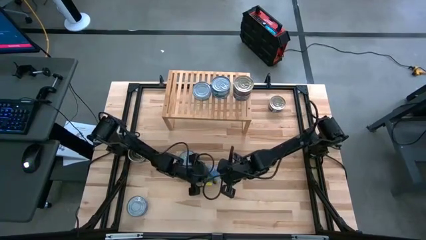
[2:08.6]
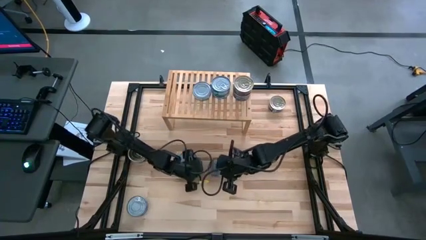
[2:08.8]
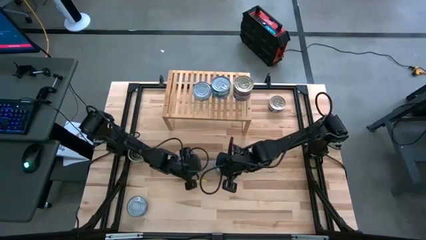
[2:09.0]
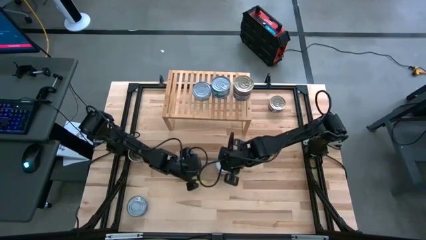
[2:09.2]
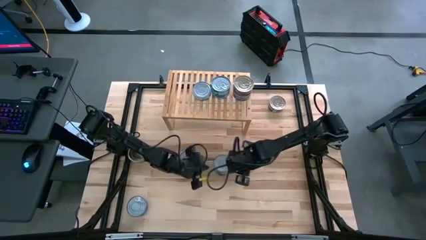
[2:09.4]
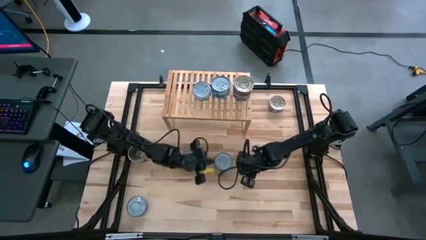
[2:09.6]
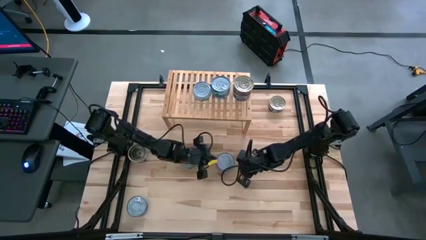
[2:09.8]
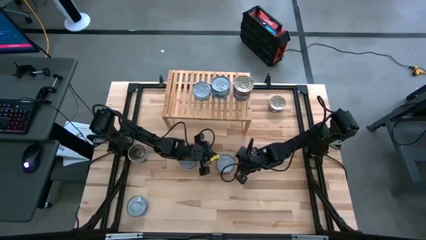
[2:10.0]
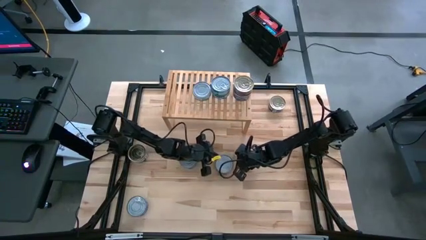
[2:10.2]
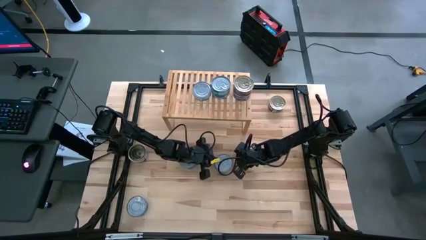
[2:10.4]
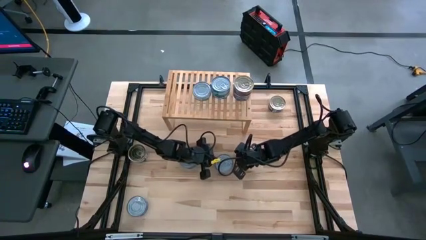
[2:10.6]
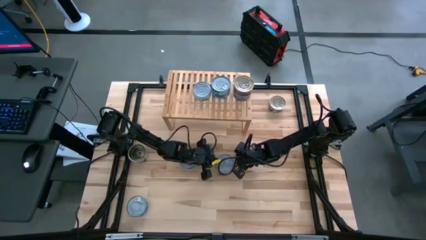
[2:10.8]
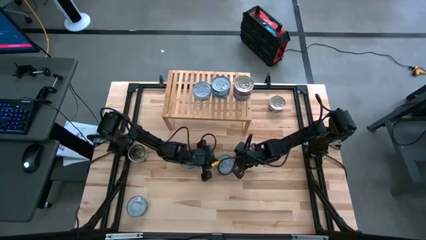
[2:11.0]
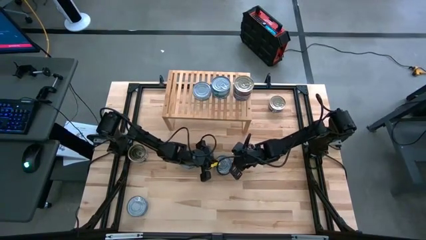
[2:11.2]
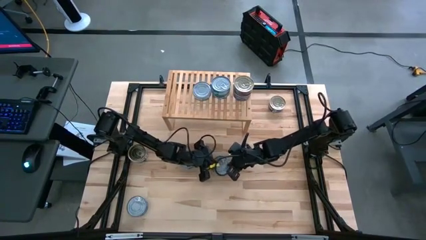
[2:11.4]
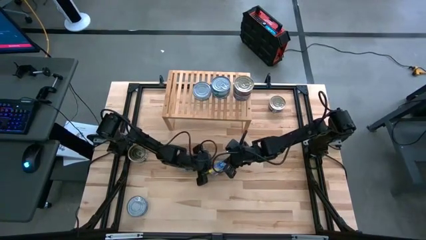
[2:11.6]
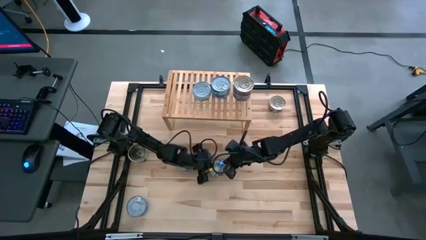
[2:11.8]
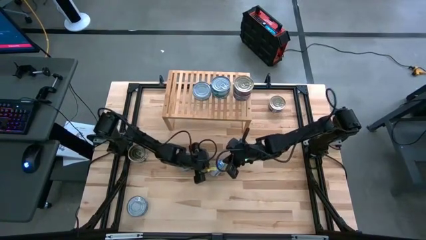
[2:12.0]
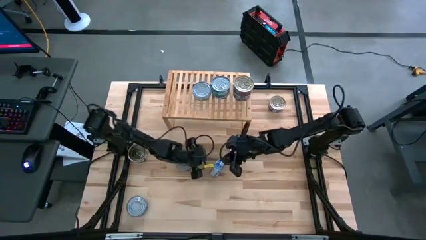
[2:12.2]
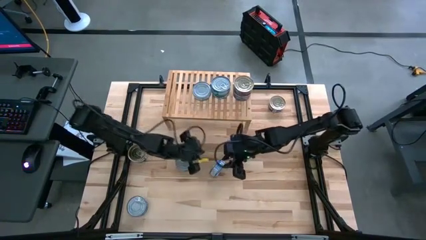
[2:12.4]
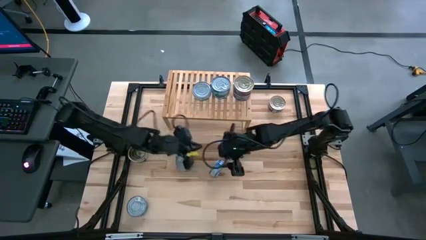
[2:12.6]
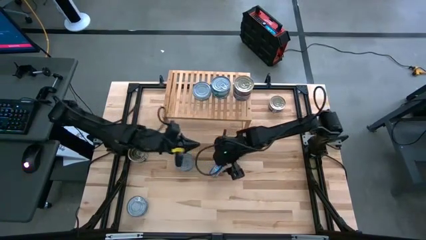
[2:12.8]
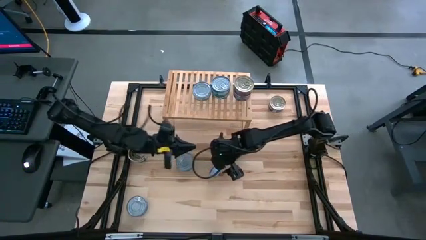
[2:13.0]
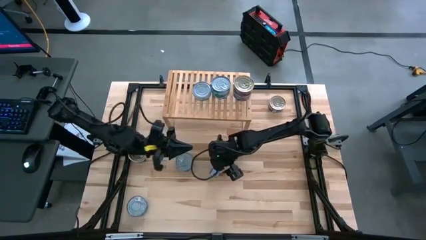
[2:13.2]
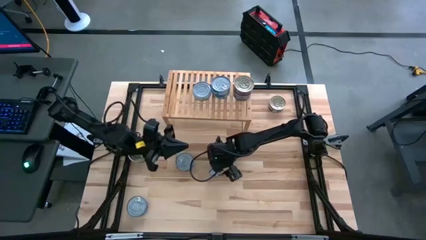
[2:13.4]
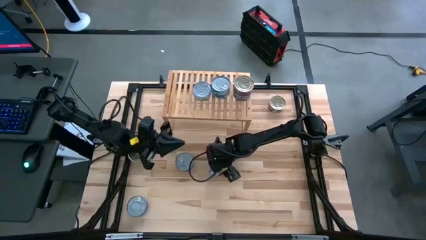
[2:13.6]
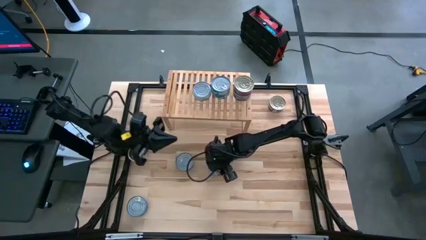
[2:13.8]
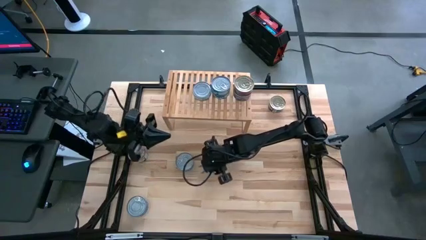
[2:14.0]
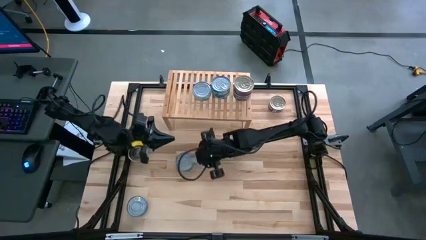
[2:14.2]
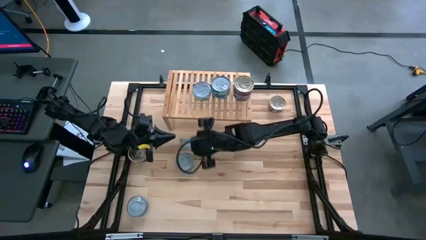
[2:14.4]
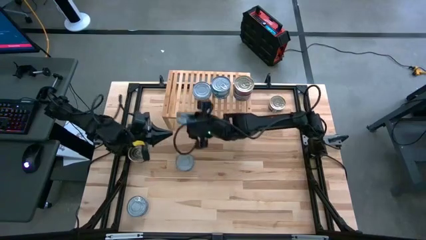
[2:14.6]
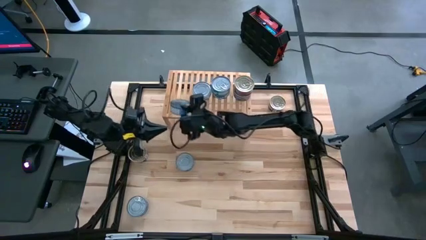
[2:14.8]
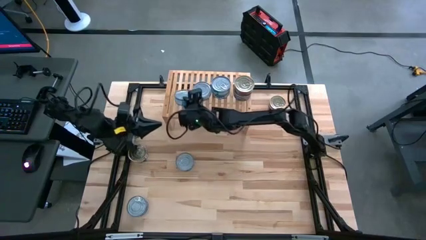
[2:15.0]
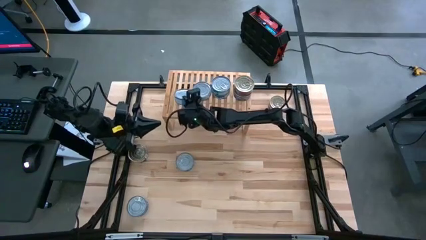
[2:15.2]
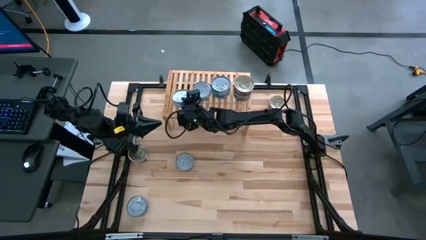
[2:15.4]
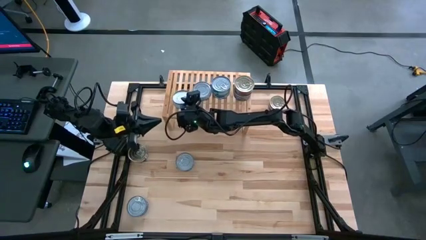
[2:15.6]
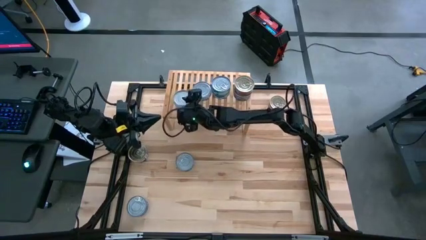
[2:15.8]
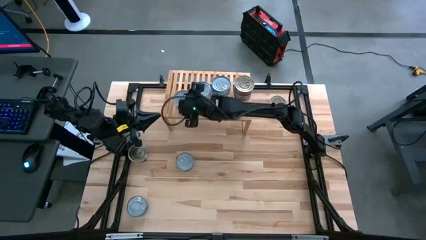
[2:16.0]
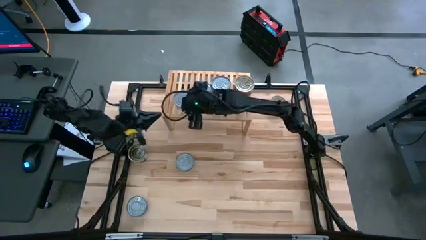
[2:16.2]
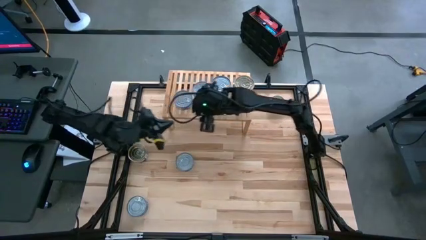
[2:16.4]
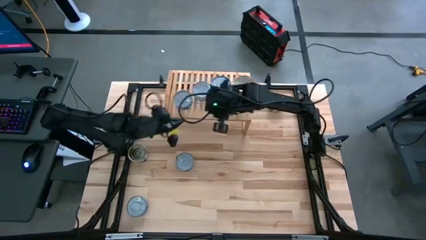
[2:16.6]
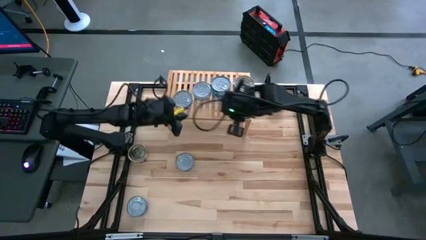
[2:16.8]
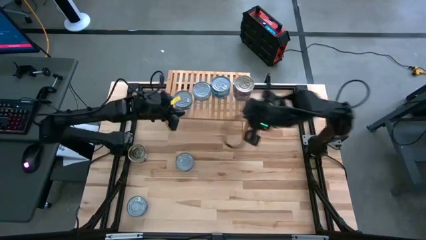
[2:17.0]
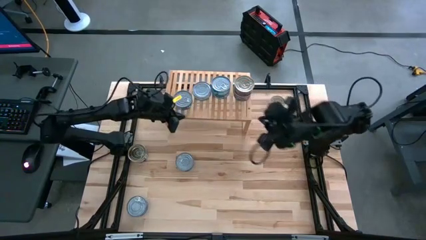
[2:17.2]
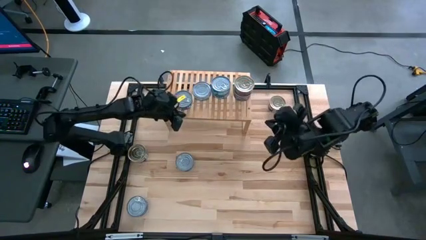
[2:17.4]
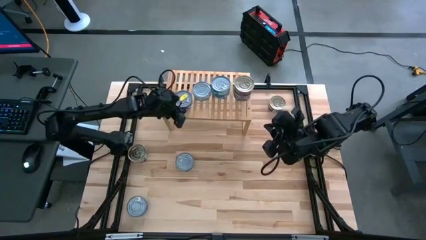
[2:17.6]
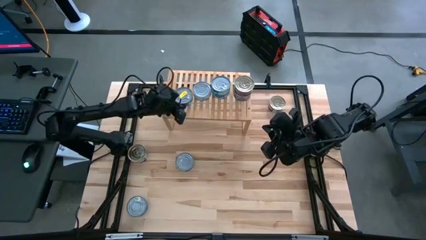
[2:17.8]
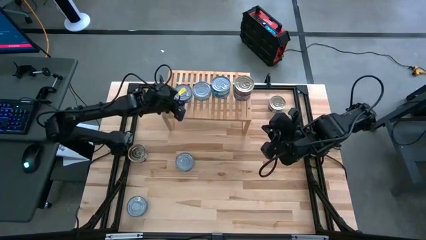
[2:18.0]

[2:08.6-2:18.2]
Task: Stack canned seafood by type on shelf
Put the blue tuna can on the shelf

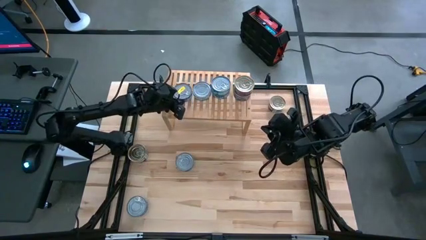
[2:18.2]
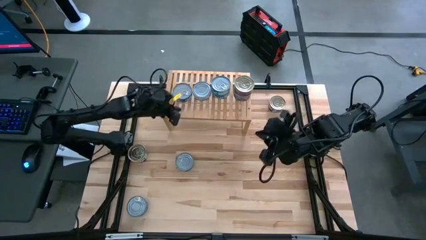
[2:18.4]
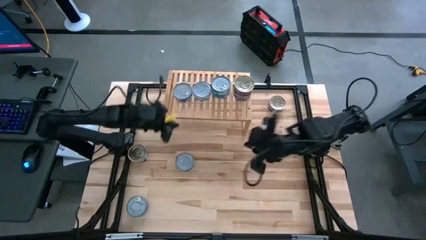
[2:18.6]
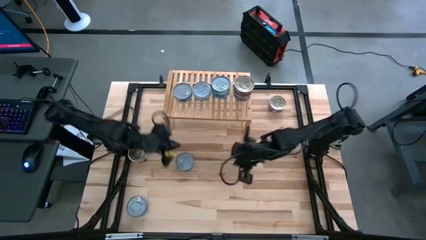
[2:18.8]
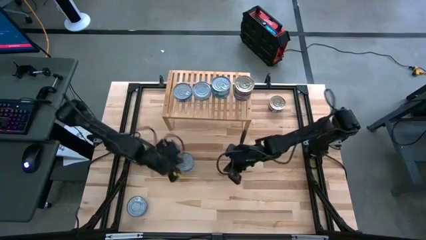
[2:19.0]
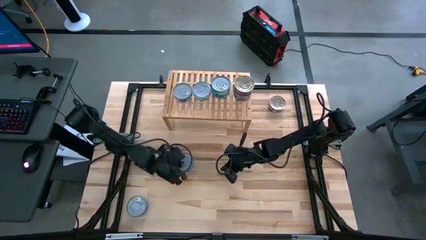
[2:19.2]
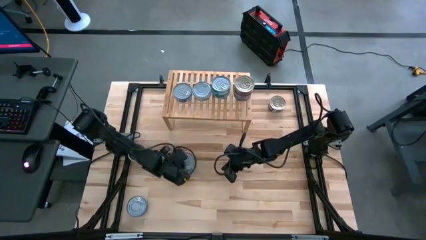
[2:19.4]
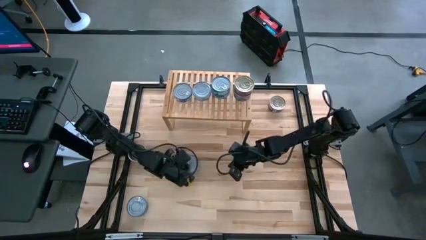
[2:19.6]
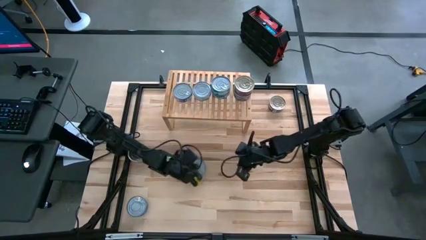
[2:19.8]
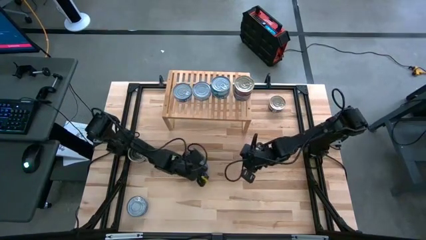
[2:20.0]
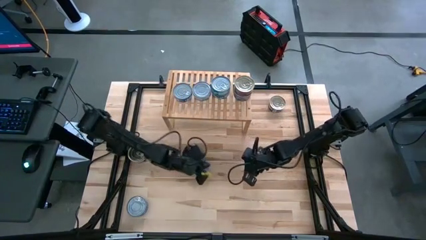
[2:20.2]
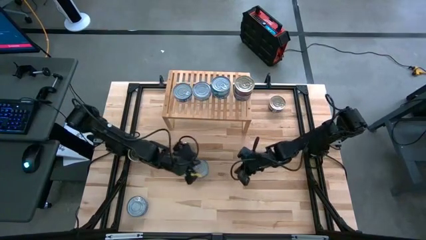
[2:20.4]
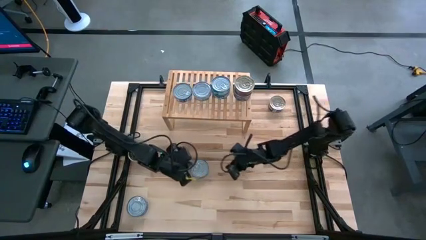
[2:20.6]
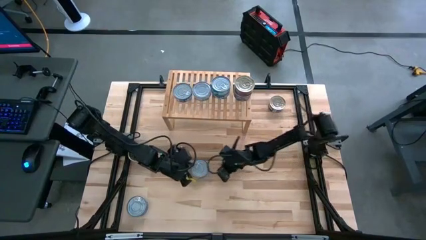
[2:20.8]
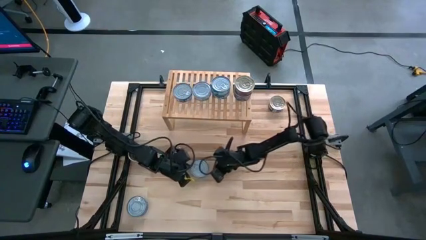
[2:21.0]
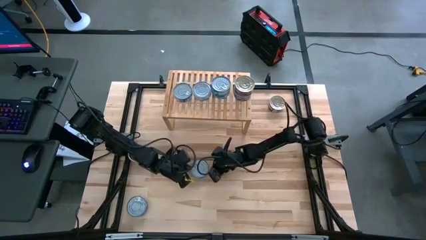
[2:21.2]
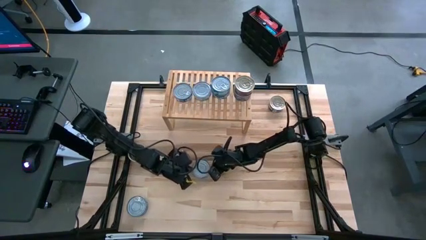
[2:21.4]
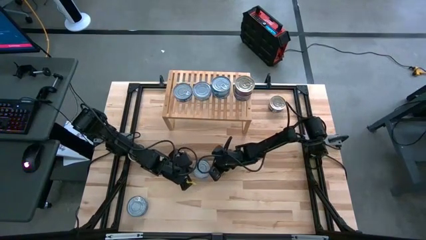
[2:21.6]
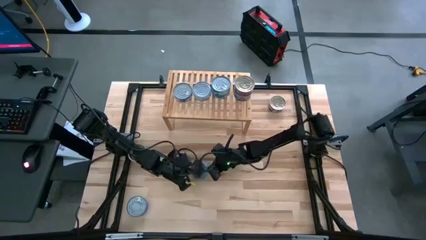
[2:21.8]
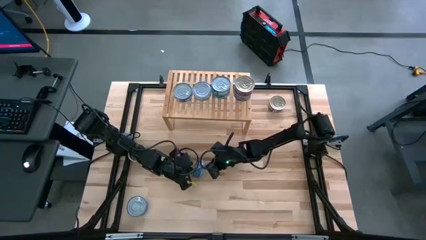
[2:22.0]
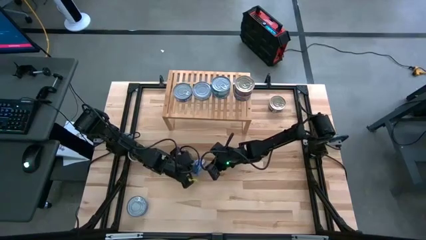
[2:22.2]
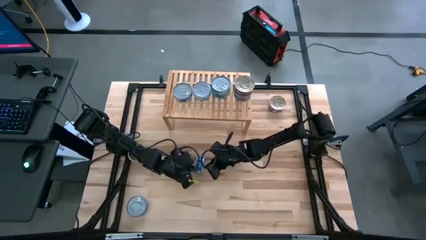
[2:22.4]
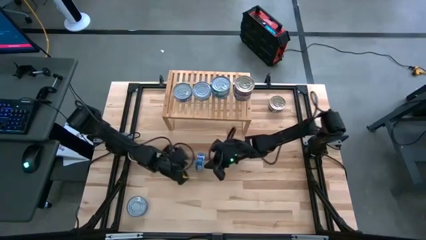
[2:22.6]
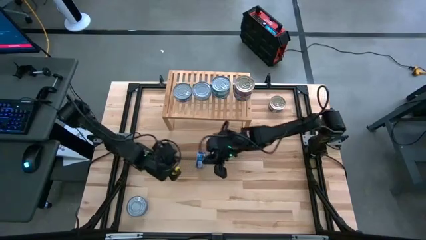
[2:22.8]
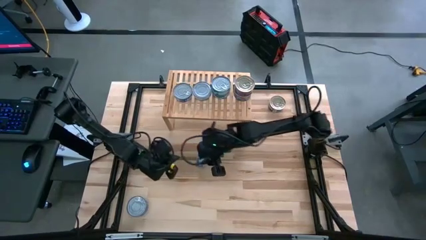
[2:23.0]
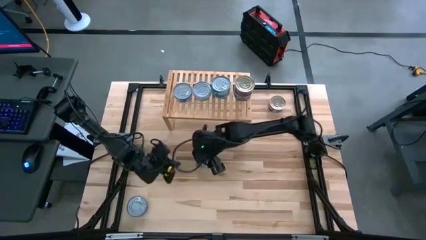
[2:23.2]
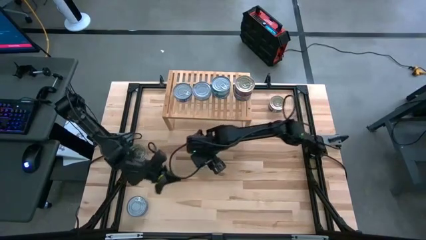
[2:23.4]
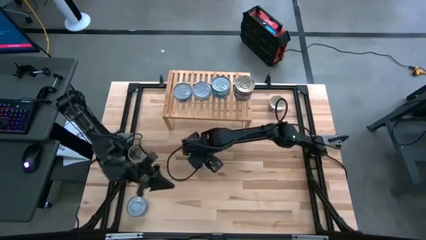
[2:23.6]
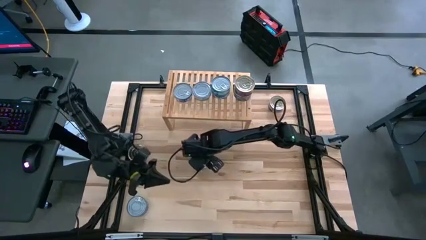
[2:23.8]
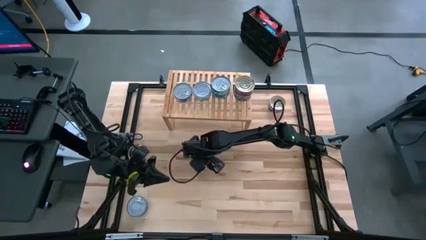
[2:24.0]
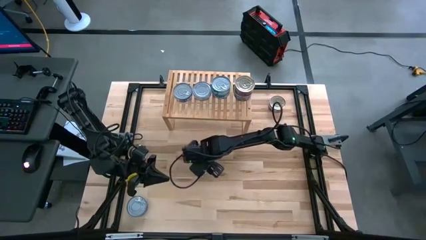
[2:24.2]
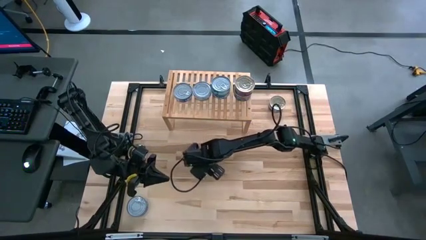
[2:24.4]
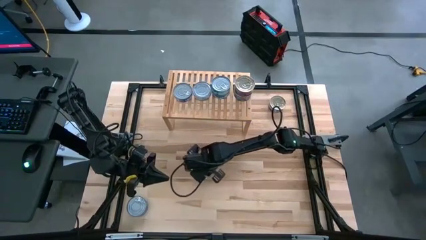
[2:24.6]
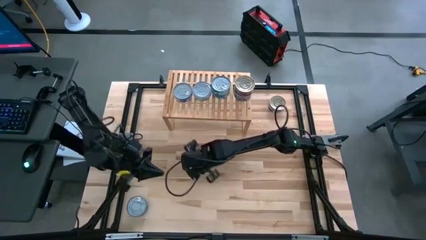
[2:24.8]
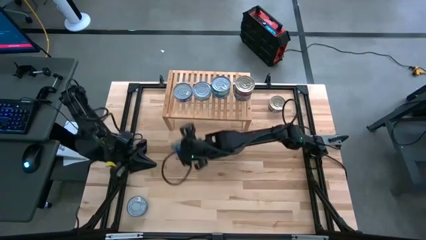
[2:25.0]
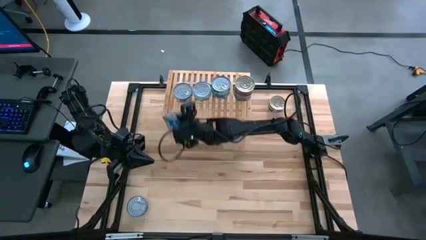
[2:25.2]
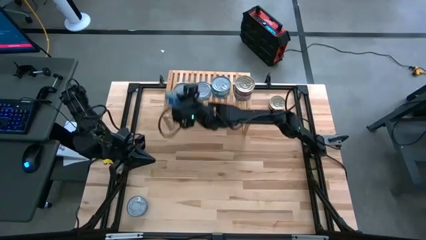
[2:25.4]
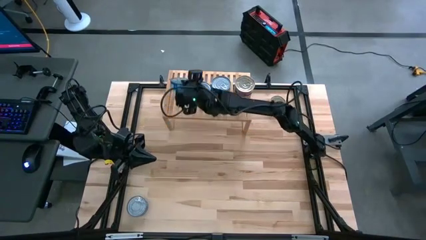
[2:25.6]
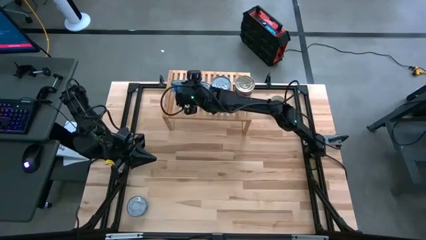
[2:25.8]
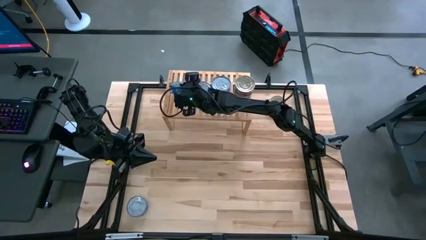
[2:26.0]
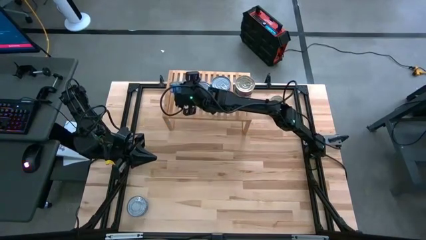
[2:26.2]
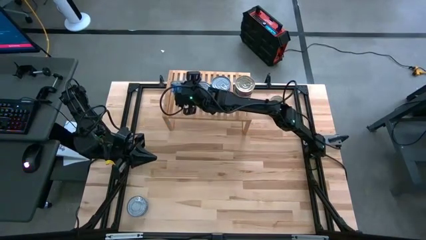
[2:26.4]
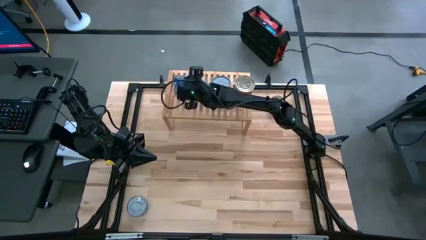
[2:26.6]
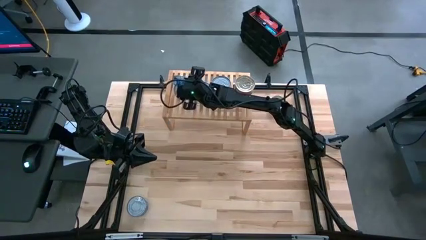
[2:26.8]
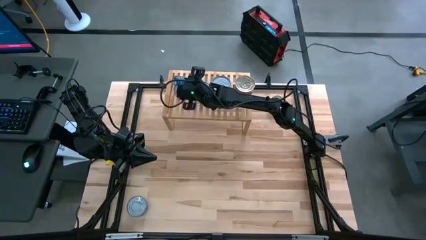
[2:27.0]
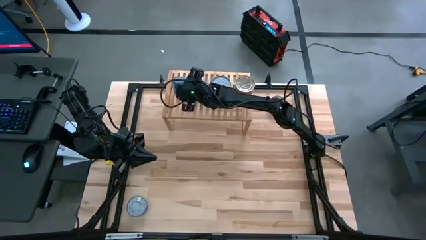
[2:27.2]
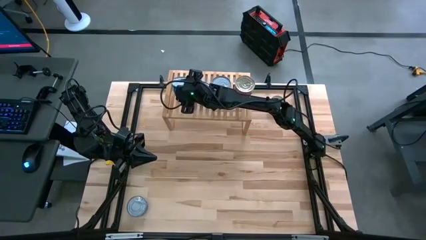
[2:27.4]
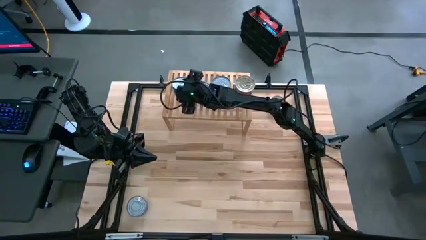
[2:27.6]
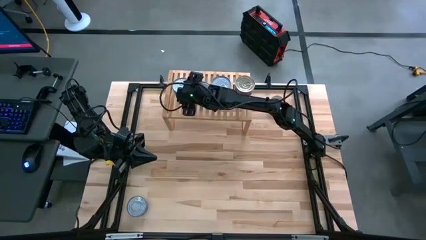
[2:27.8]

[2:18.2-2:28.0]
Stack the blue tuna can on top of the other blue tuna can on the shelf
